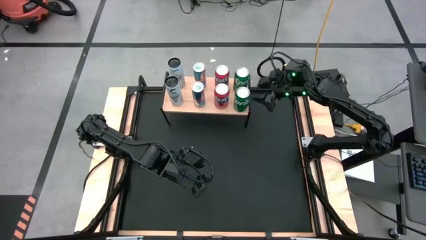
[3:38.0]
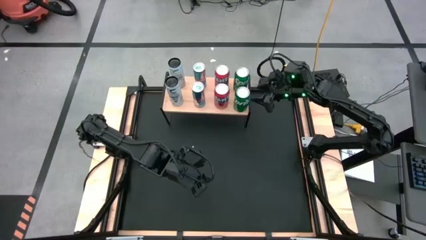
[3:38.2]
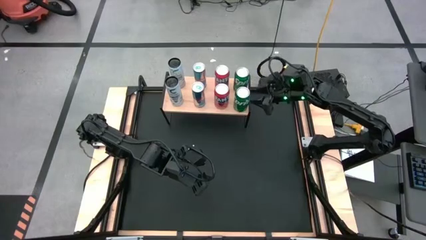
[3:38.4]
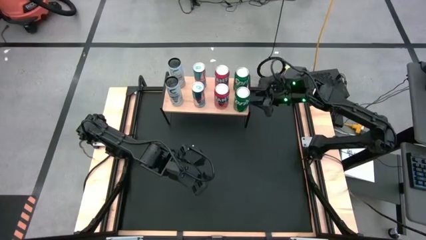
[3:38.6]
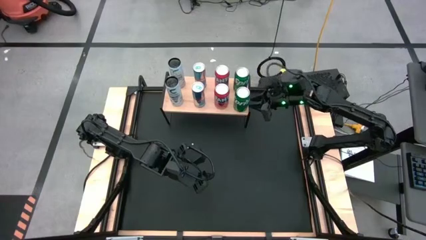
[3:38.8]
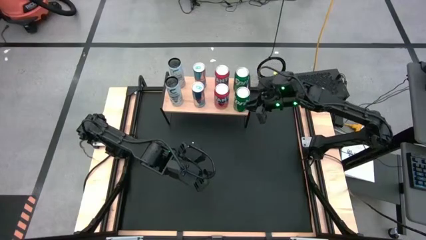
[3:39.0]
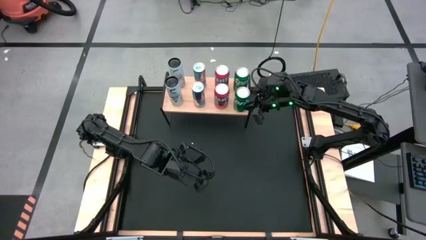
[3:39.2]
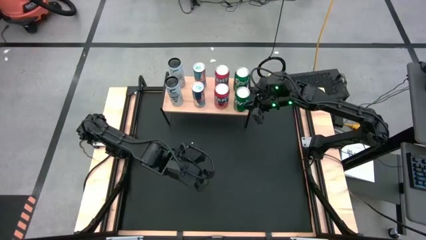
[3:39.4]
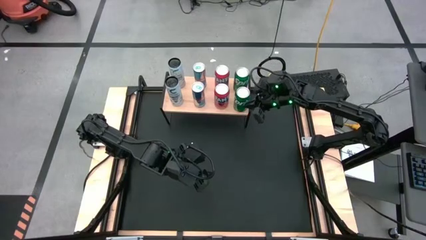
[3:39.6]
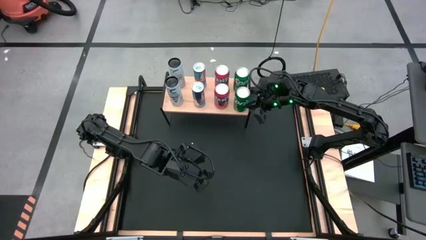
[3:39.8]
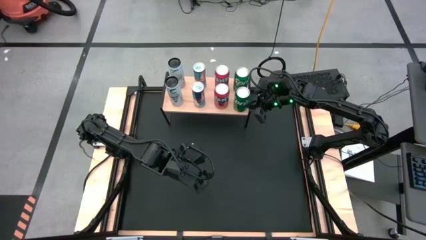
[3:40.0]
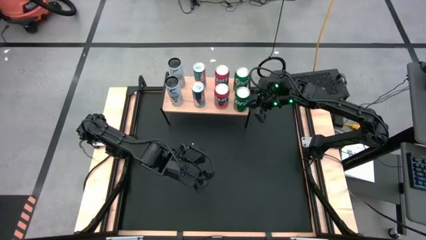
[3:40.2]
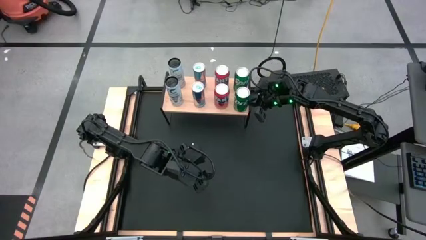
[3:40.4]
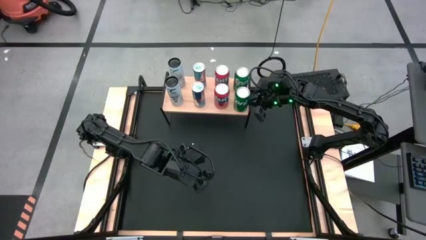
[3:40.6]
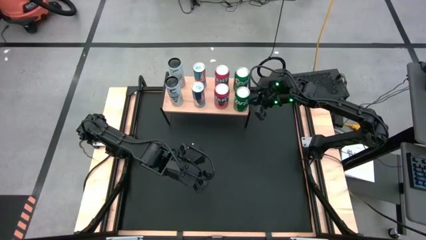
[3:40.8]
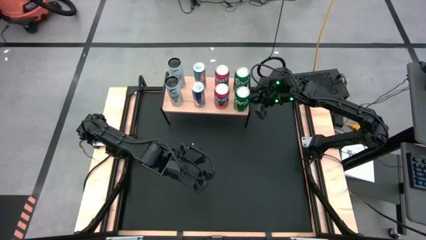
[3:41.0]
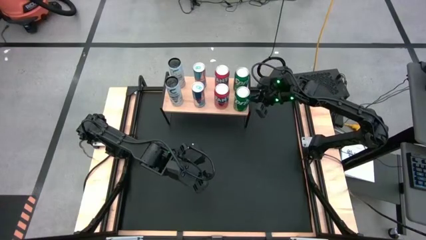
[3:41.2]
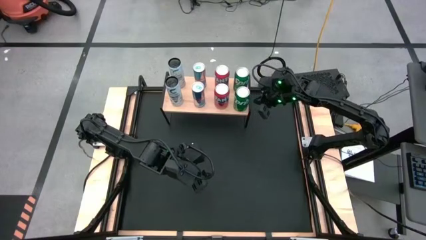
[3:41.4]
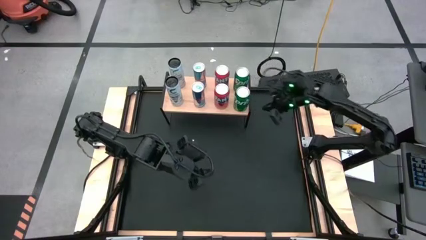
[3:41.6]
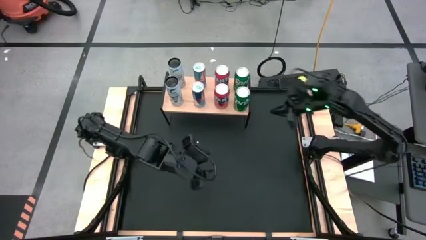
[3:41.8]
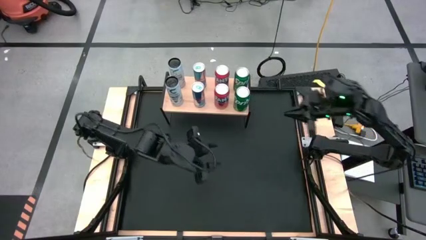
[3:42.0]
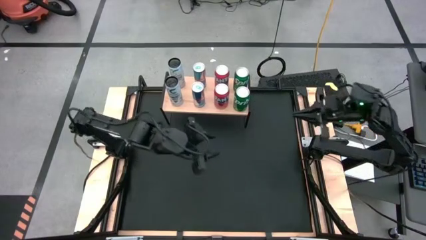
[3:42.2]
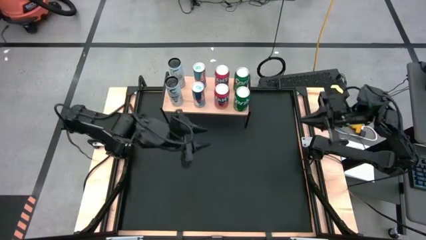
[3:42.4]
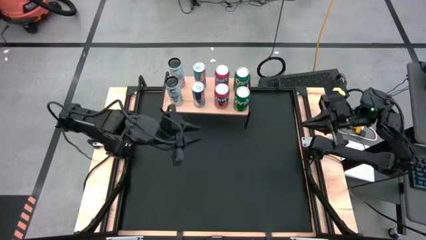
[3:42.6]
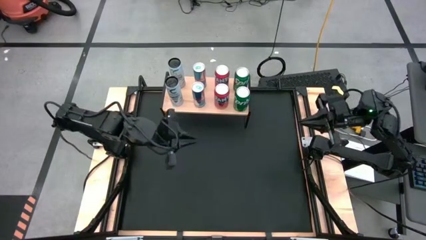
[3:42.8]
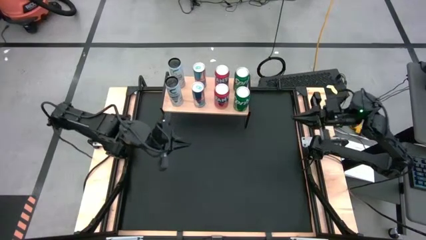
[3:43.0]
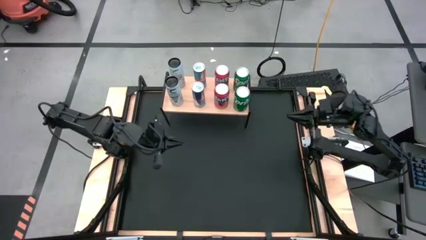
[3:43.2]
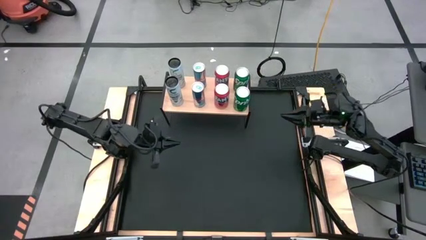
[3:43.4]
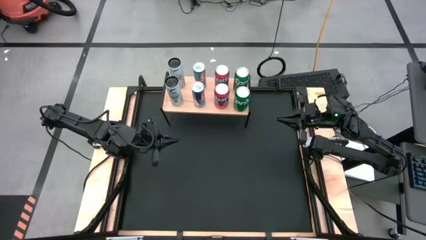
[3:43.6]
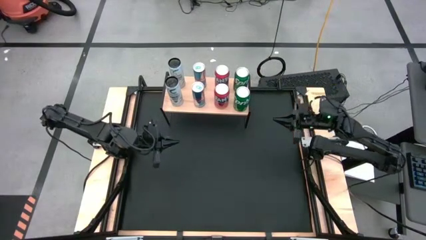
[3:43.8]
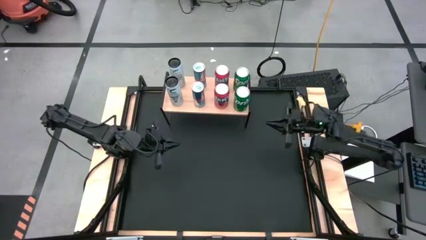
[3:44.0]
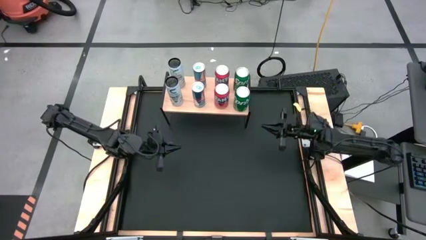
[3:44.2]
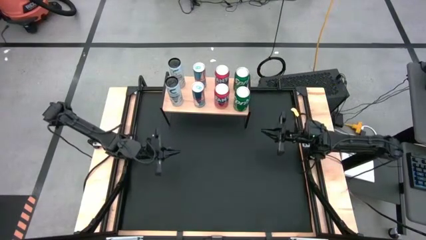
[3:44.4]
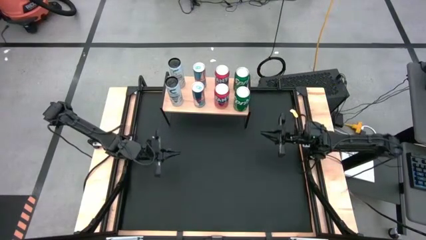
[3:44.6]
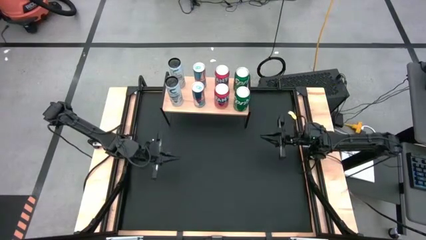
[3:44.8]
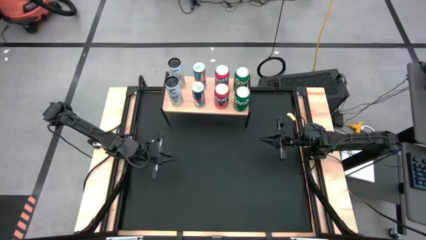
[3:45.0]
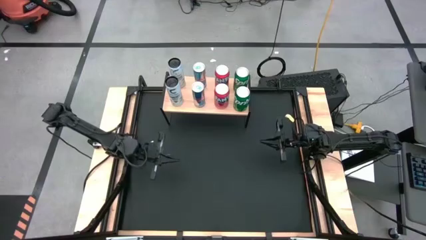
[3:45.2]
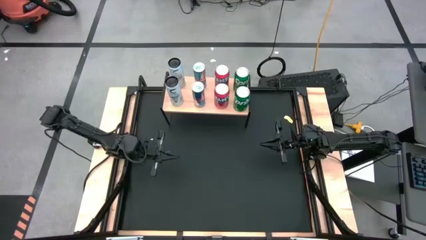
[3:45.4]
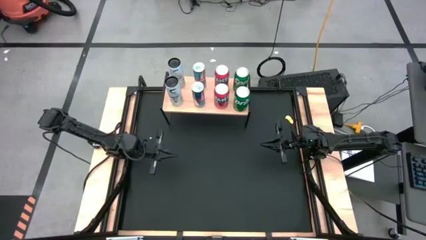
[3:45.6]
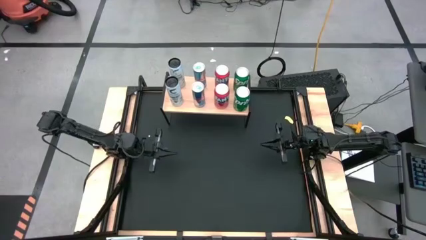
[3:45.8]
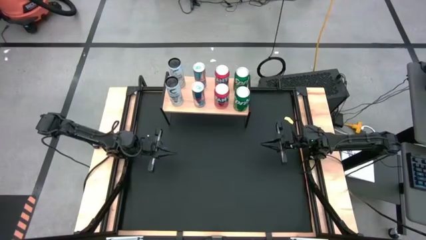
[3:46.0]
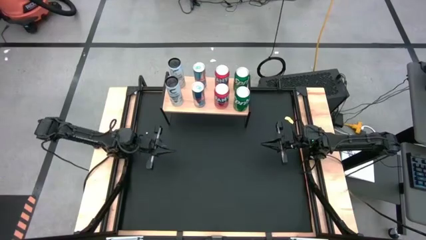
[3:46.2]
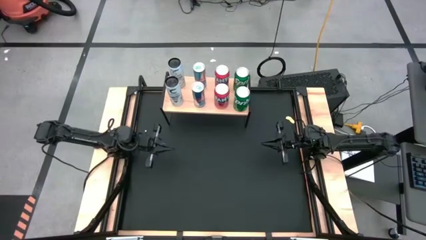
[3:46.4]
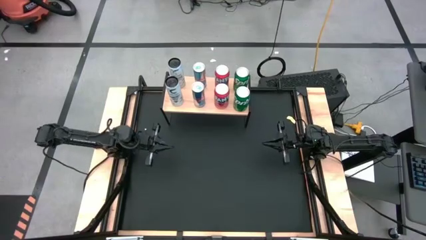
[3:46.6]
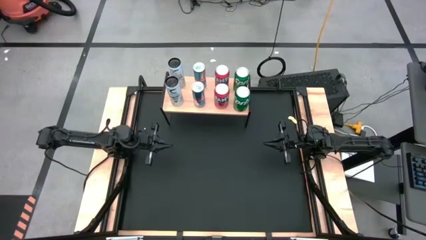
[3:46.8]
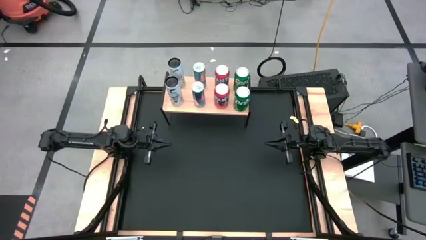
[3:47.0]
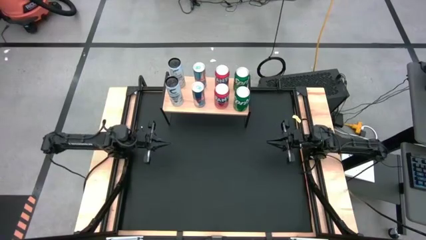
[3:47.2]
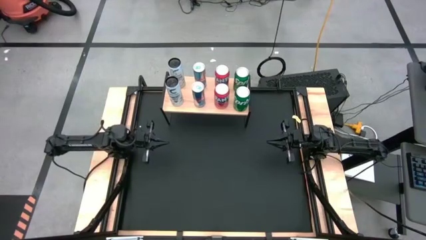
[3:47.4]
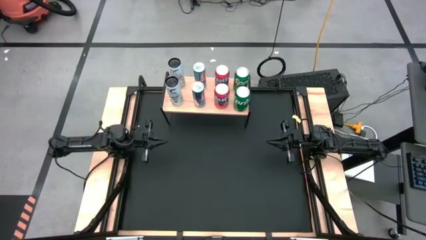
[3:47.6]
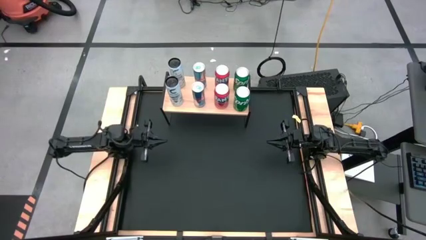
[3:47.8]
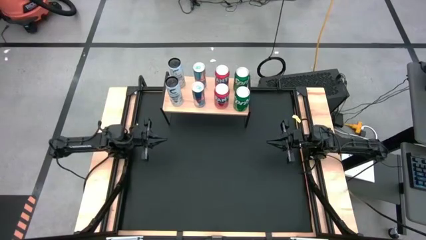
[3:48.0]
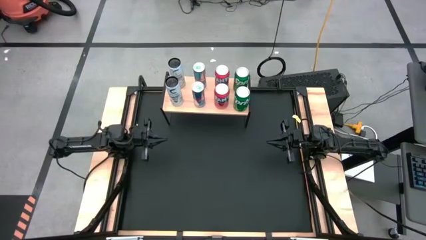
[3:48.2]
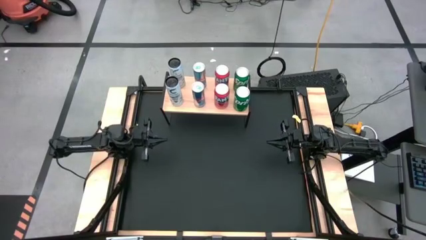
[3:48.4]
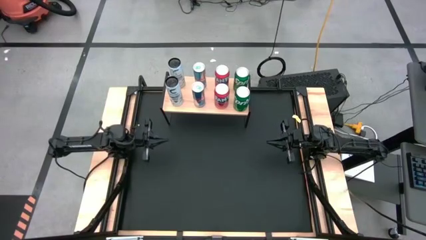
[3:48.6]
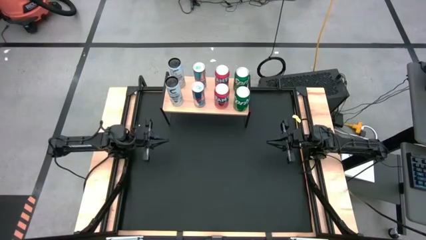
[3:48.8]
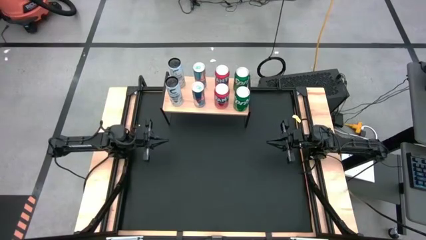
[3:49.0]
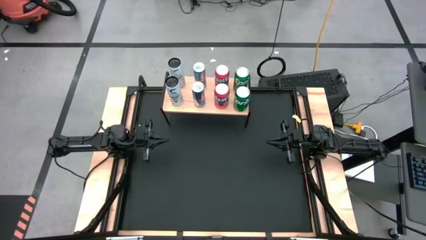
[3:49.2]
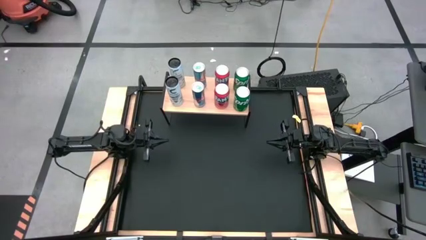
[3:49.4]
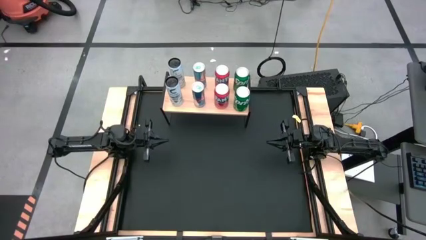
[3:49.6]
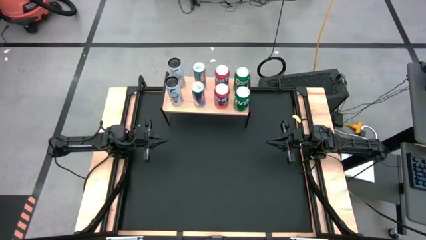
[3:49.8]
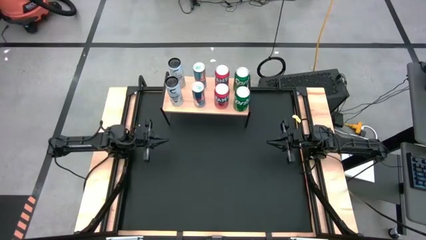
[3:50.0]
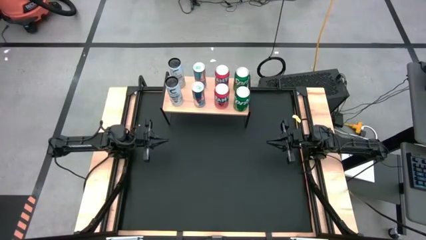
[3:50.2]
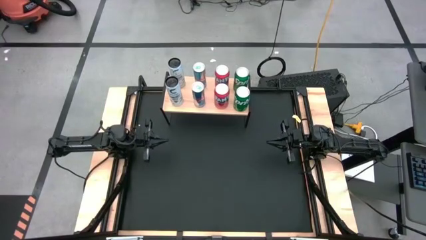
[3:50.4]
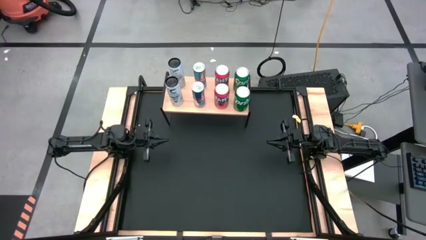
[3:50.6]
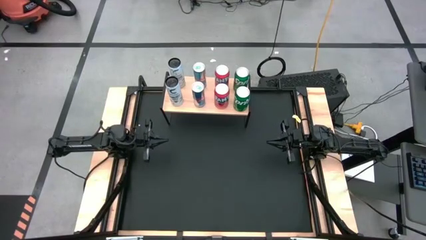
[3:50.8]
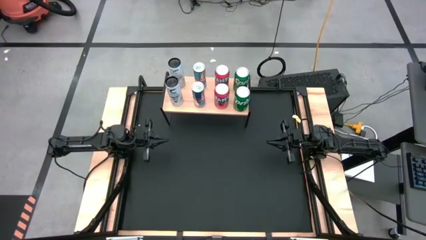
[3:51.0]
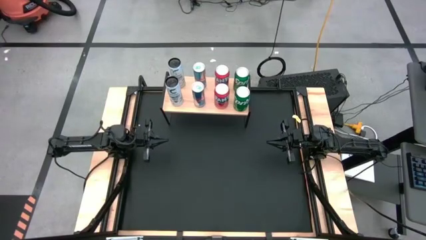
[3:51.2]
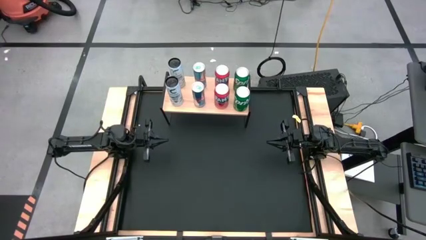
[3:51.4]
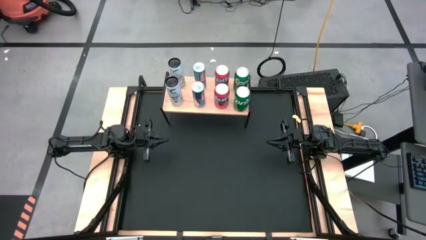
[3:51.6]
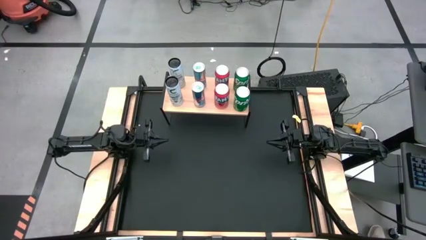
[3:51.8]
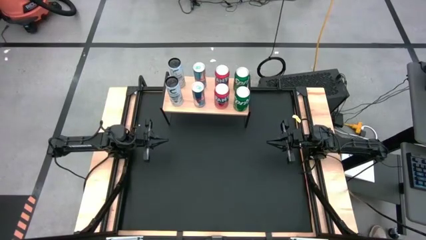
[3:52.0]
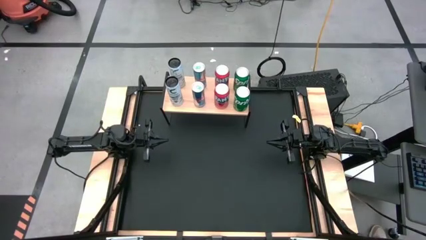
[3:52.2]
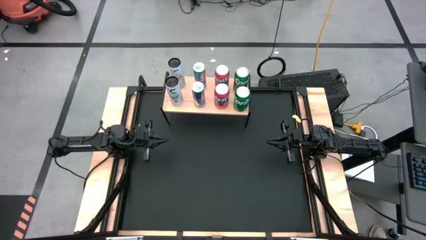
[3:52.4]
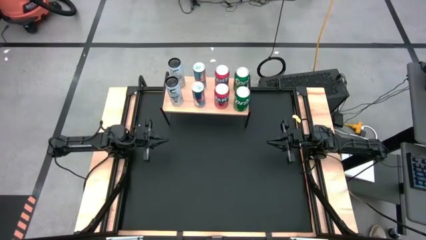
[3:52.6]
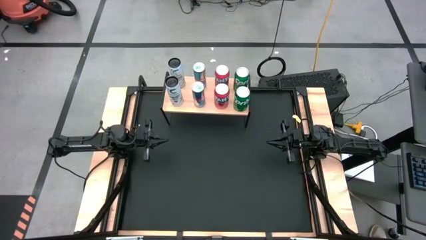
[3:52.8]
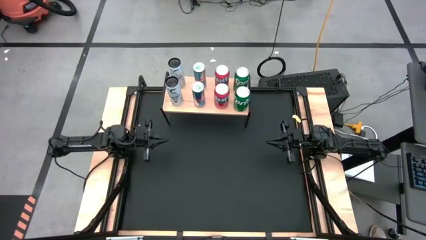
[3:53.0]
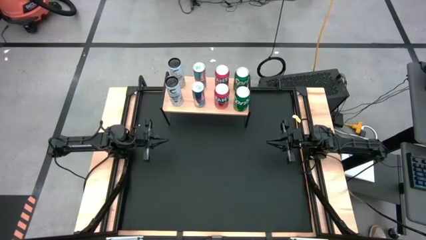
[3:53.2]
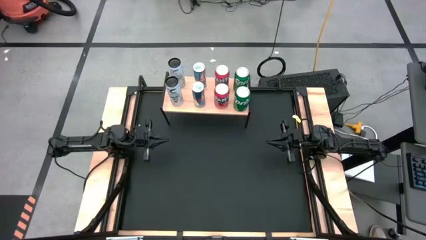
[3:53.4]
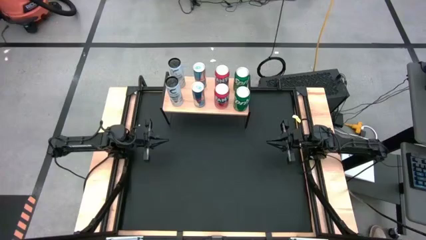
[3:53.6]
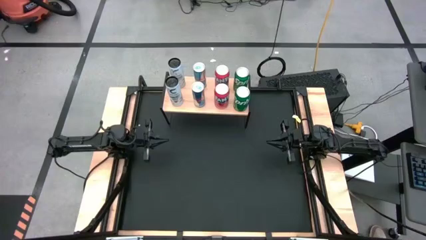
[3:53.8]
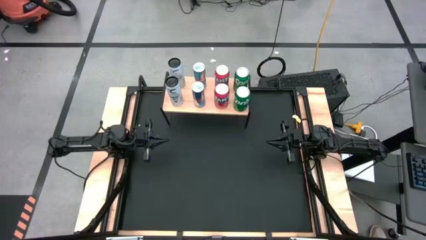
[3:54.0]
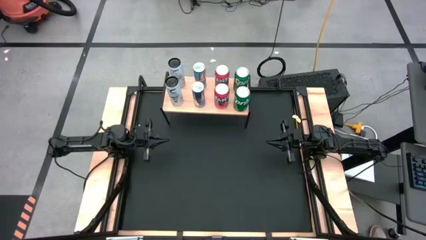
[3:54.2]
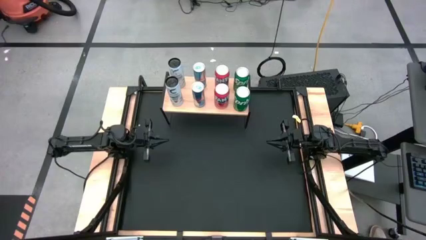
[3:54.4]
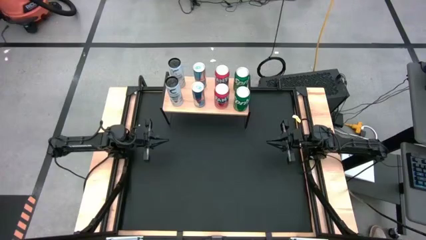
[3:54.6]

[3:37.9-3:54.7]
Task: Place canned beverage on shelf
Return to Home Position

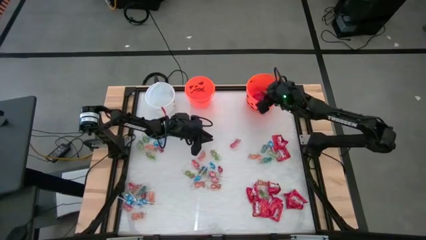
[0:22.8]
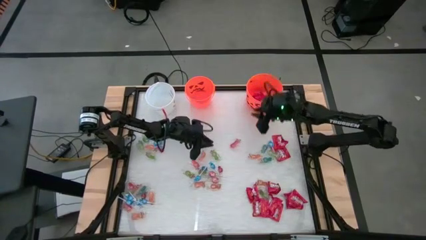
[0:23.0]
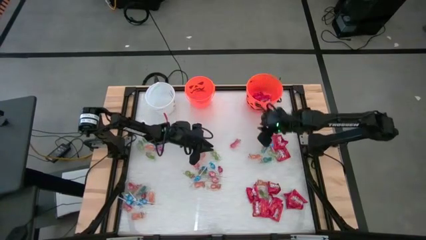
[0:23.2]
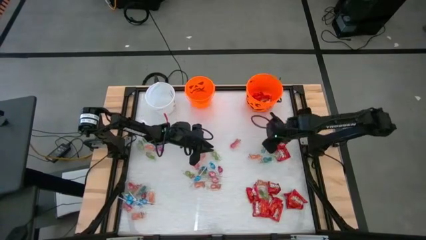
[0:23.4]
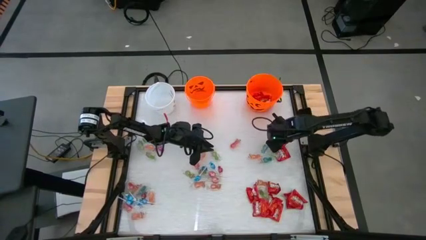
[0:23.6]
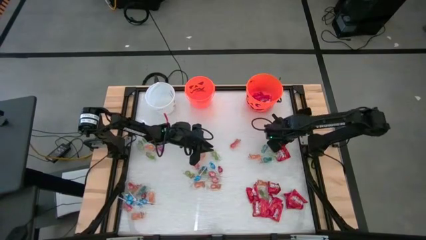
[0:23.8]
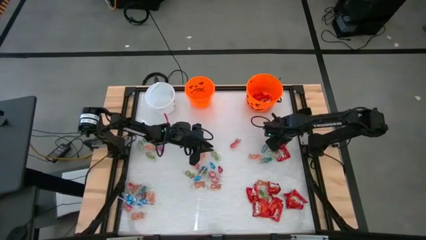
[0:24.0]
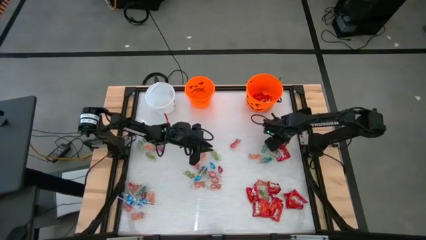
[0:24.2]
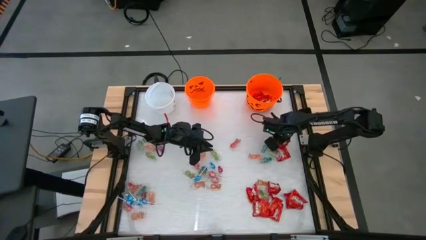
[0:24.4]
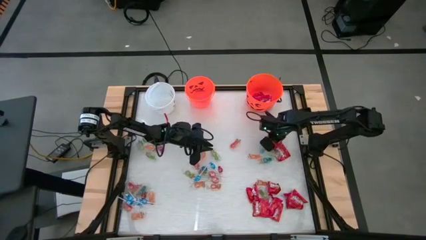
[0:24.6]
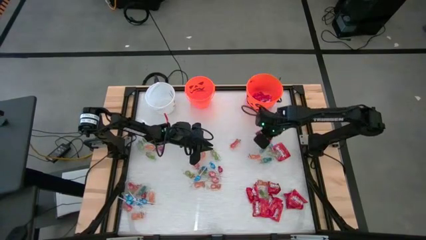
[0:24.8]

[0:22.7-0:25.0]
Task: Sort candy by brand, put in halloween buckets
Put the red candy into the right orange bucket
